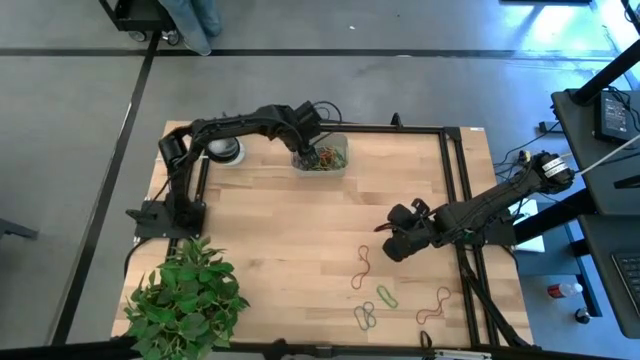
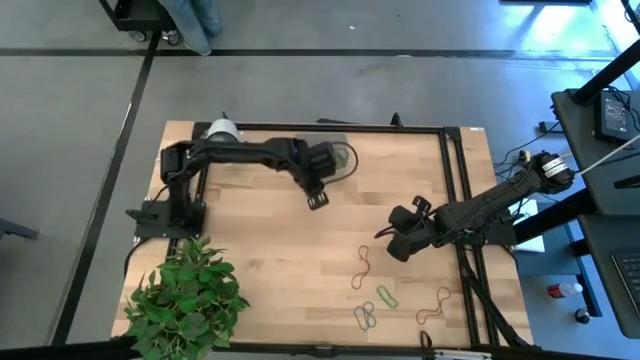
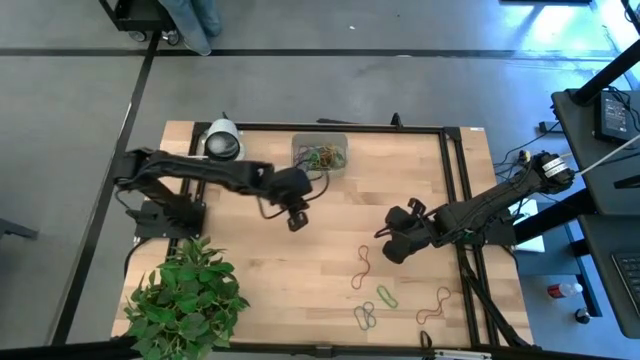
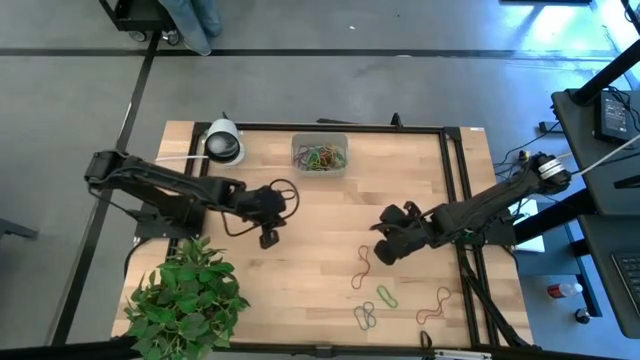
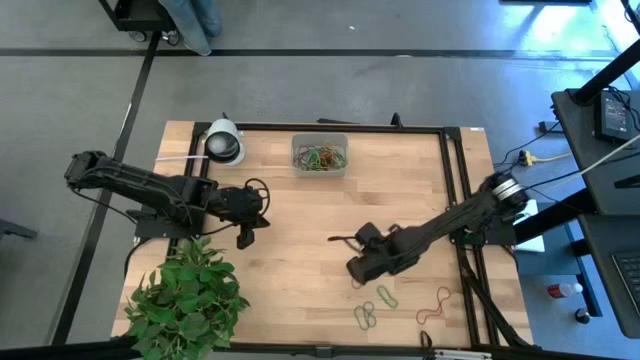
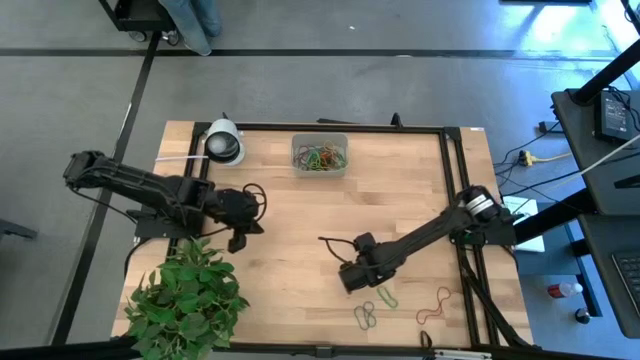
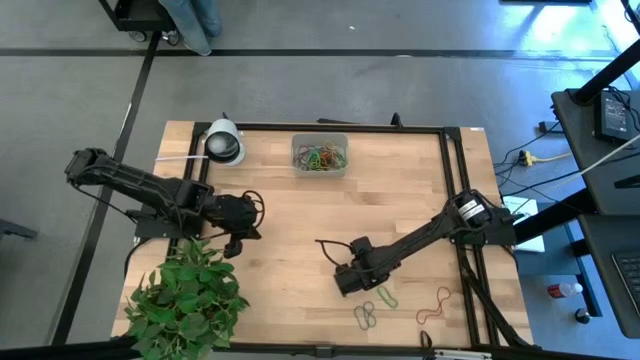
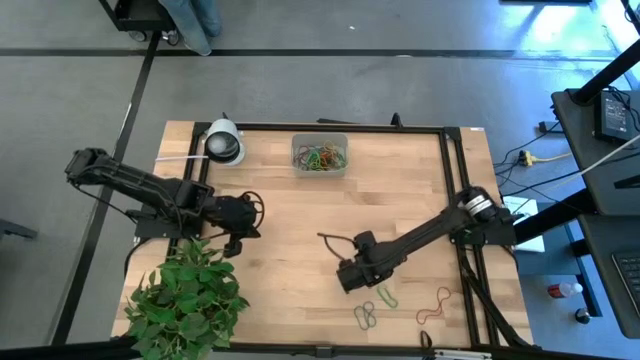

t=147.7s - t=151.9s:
Task: Pick and place rubber bands into bin
Put the red rubber band into the white bin

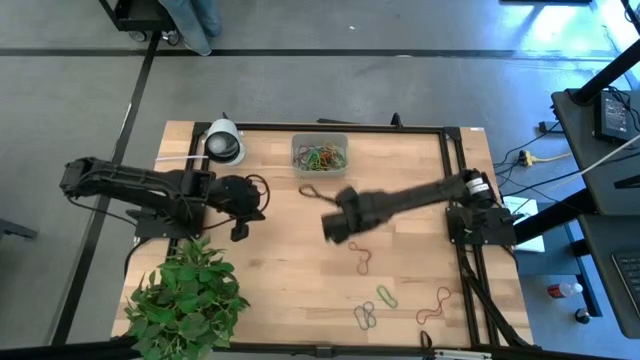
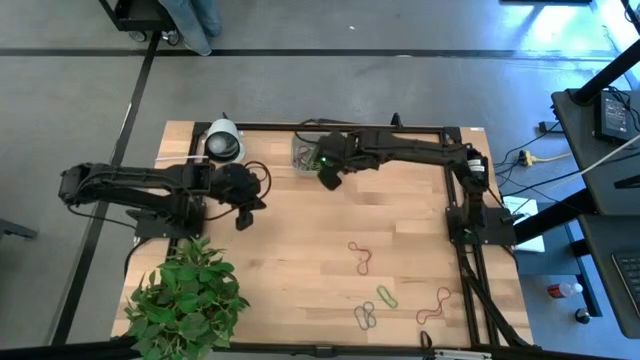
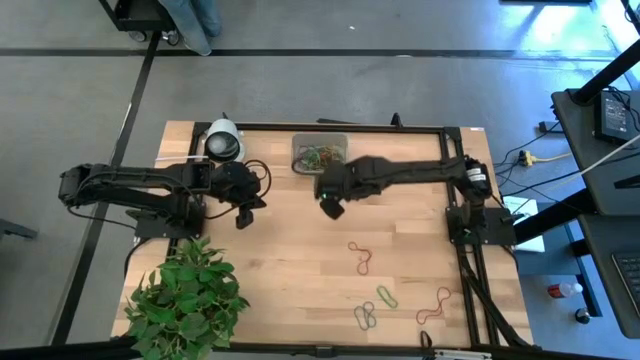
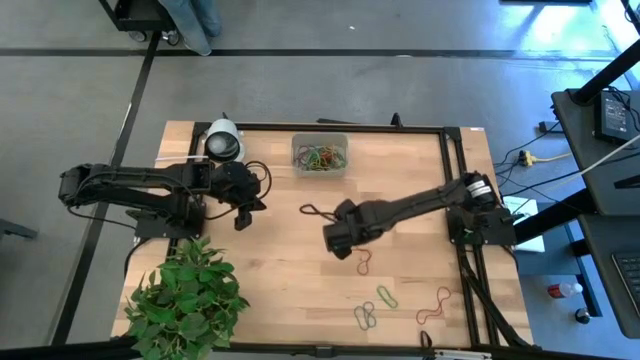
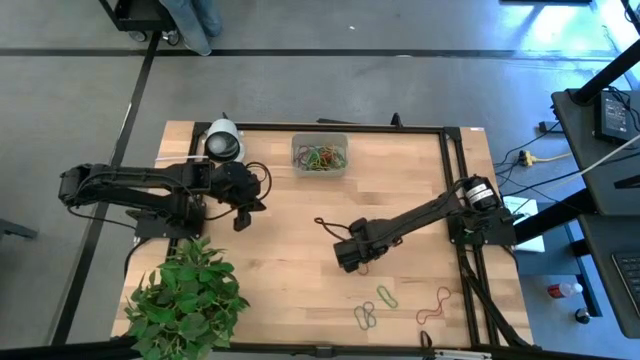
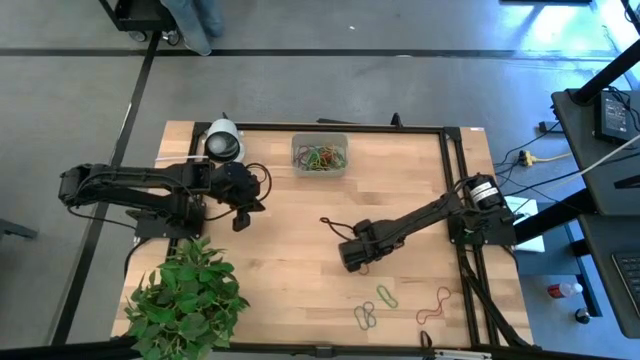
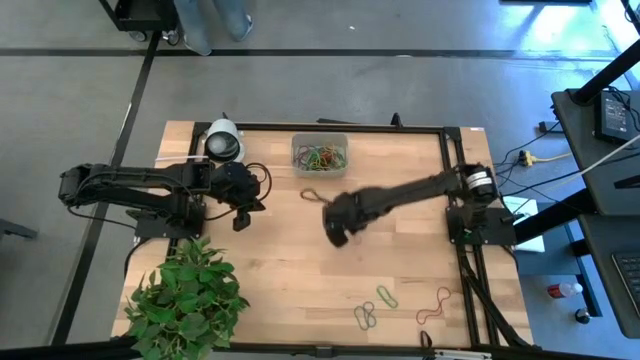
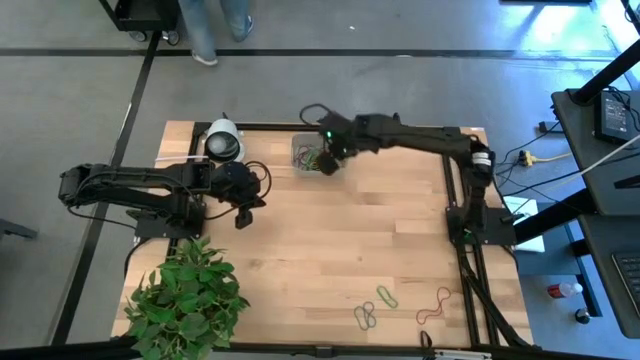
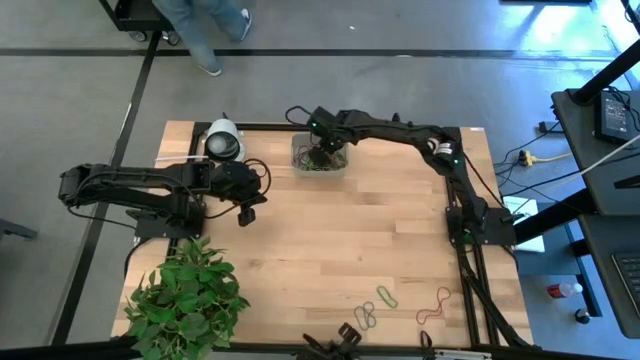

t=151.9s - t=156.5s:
Put the red rubber band into the white bin

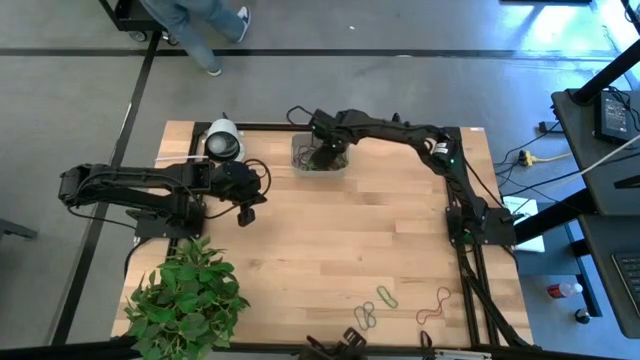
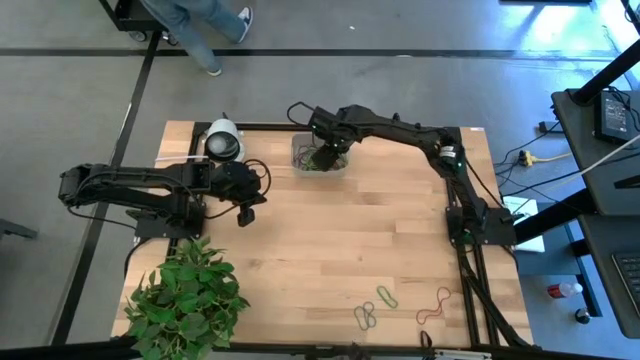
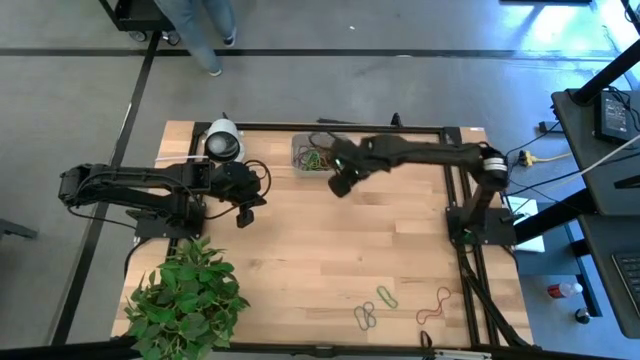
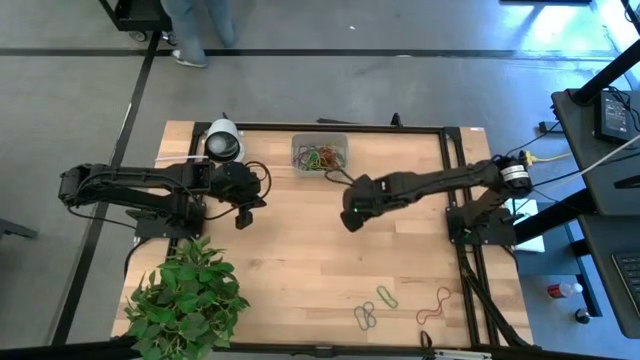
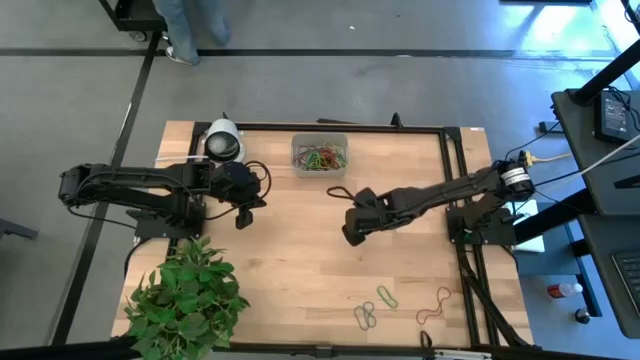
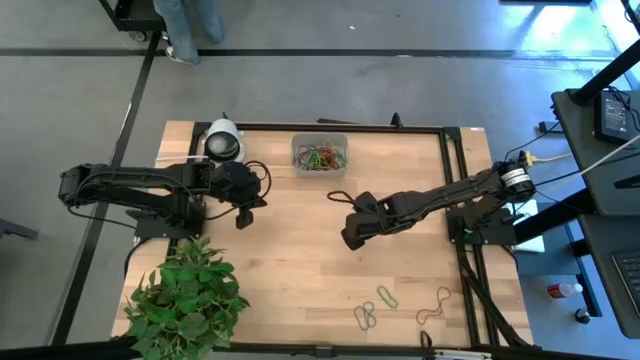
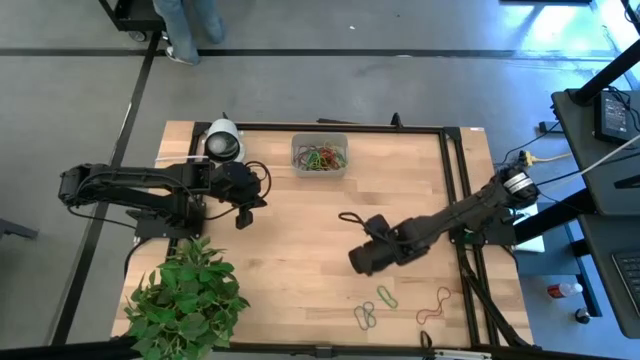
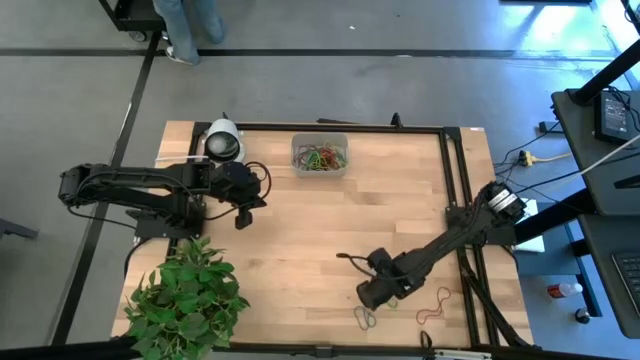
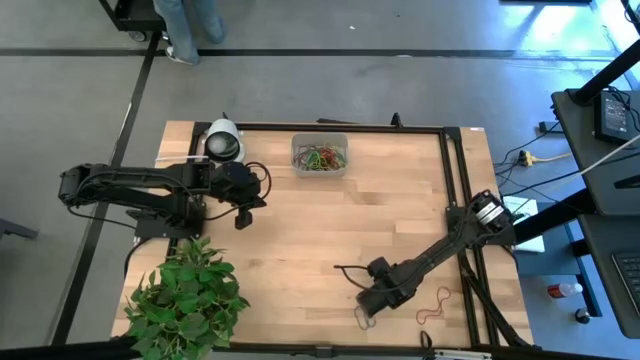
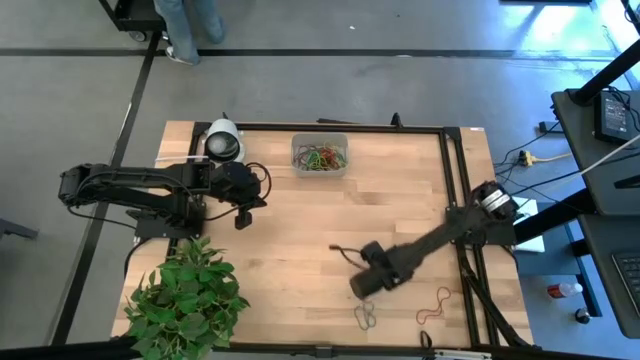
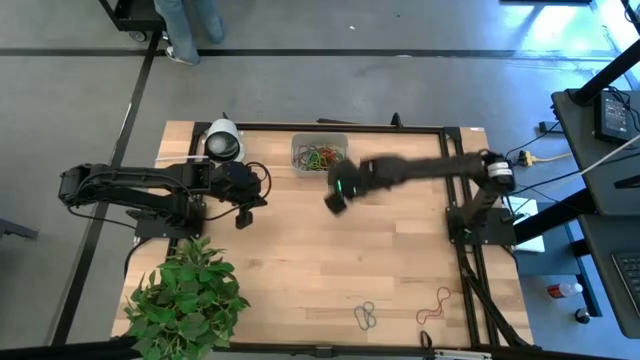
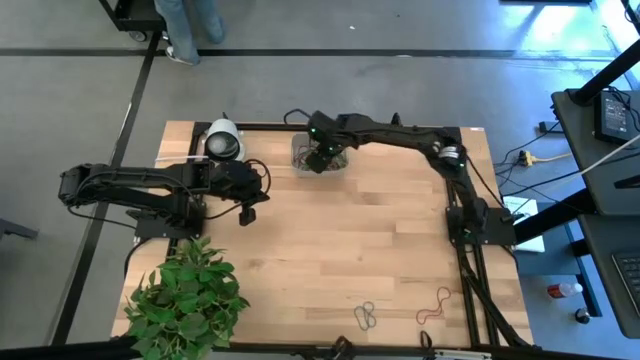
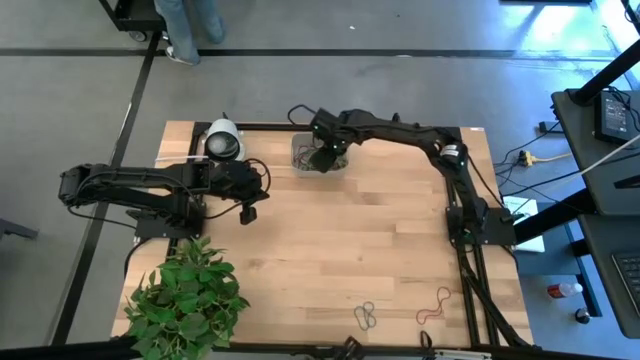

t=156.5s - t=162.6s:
Put the green rubber band into the white bin

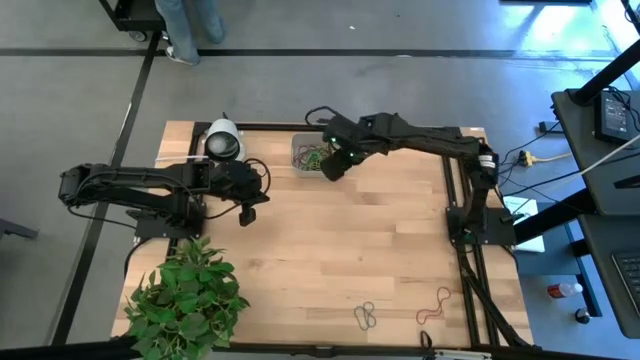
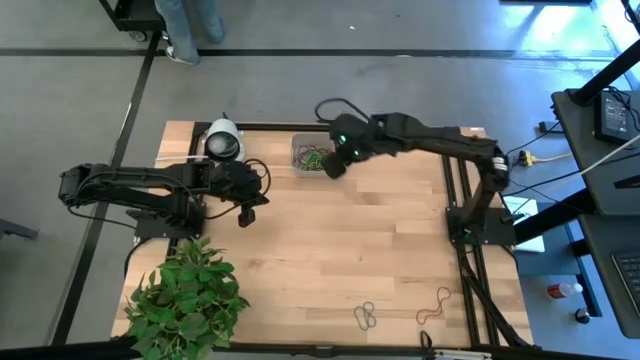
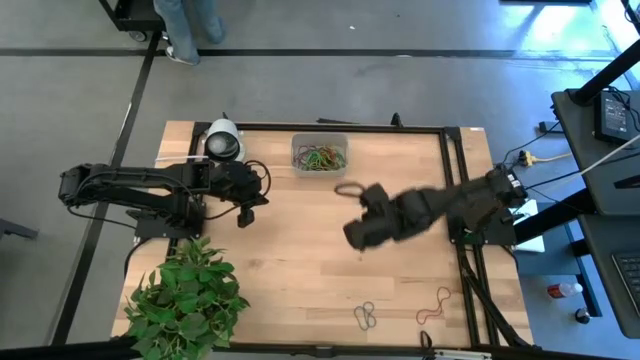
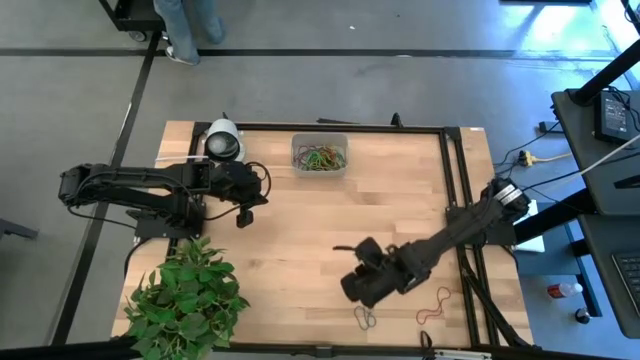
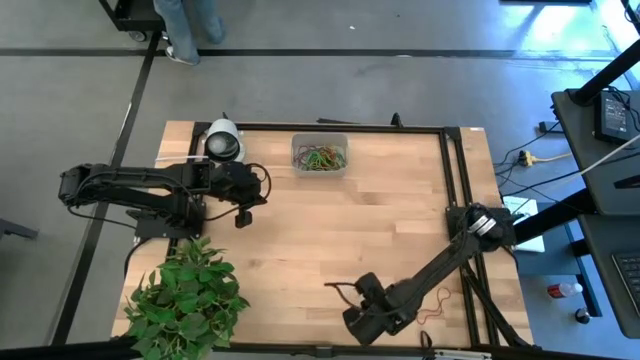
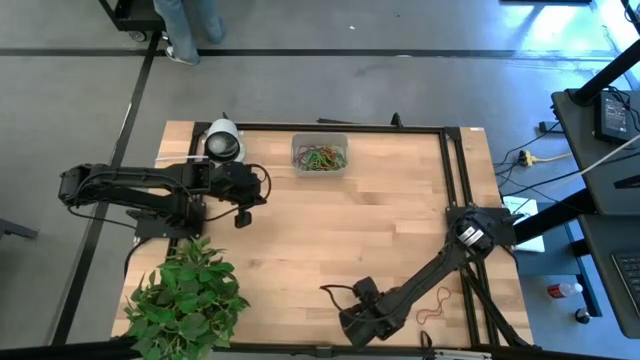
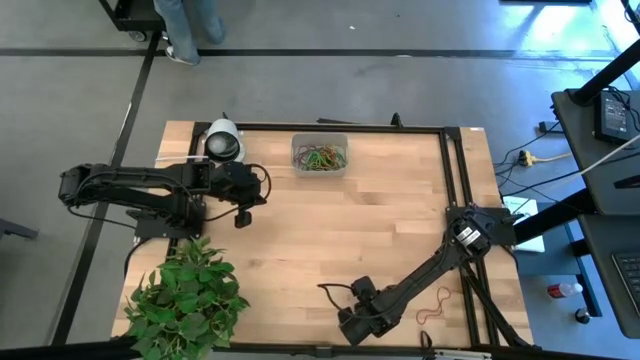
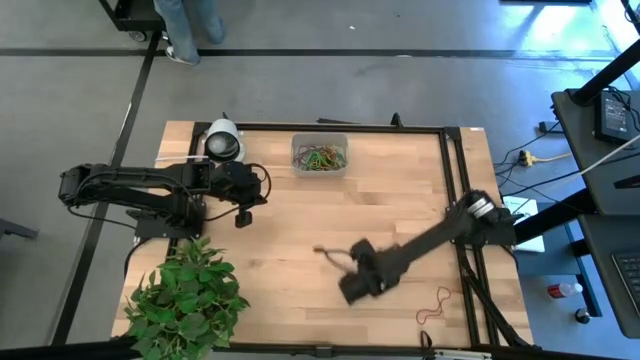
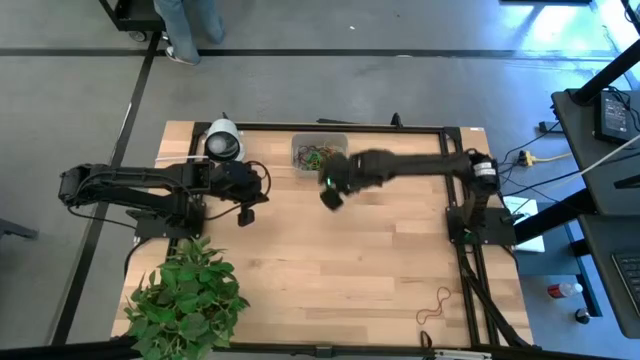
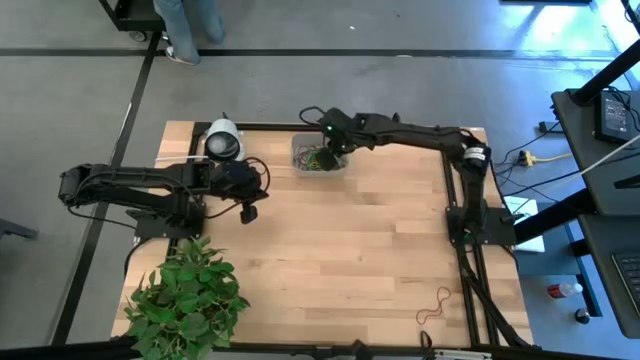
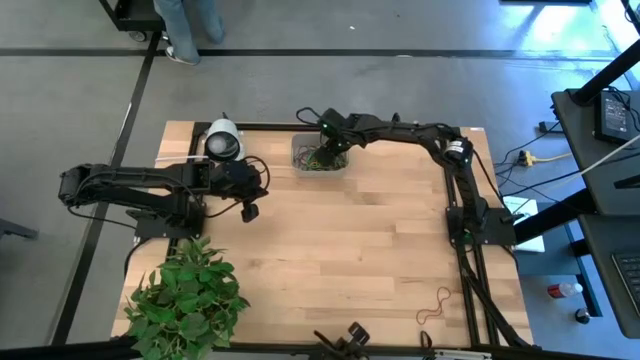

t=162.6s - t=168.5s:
Put the blue rubber band into the white bin

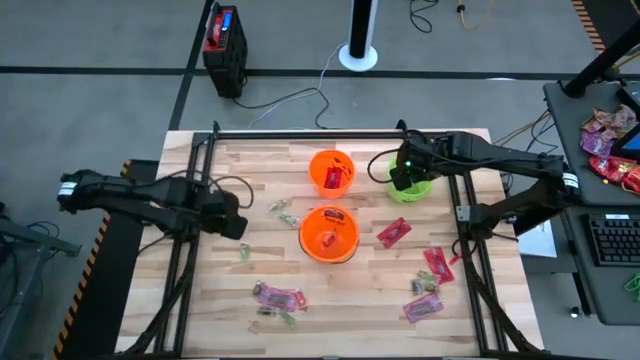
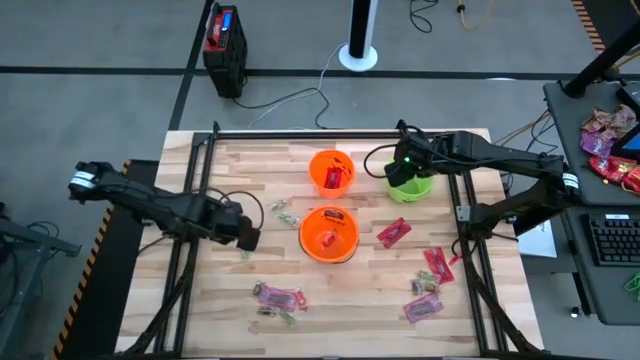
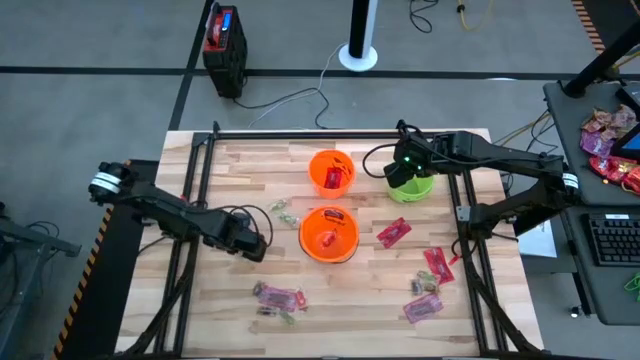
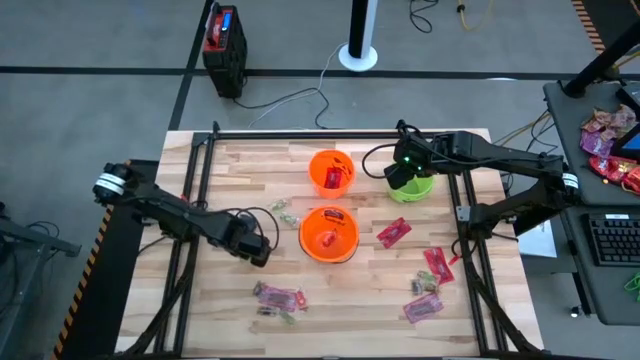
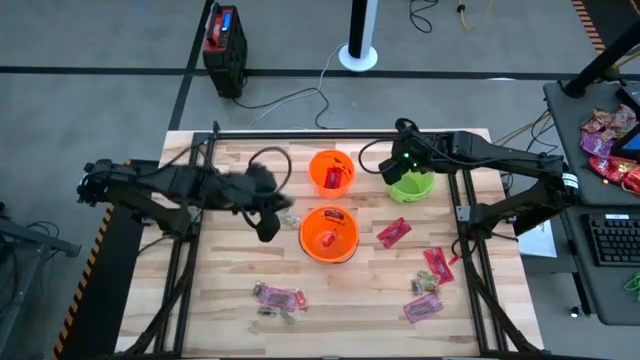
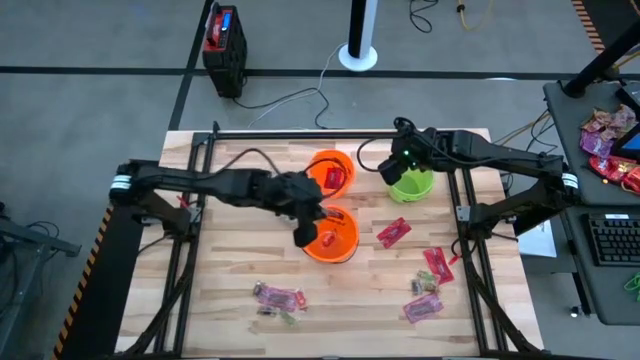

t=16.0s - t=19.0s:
Task: Sort candy by brand, put in halloween buckets
Put the green candy into the bottom orange bin
